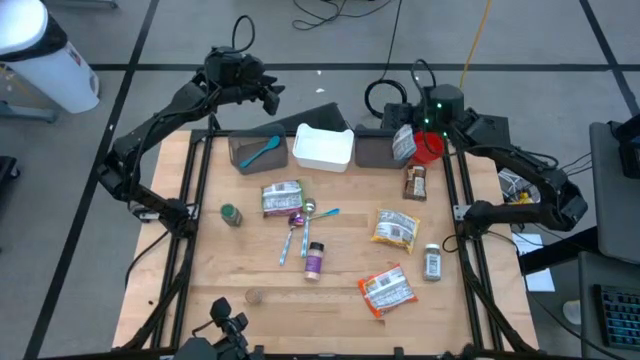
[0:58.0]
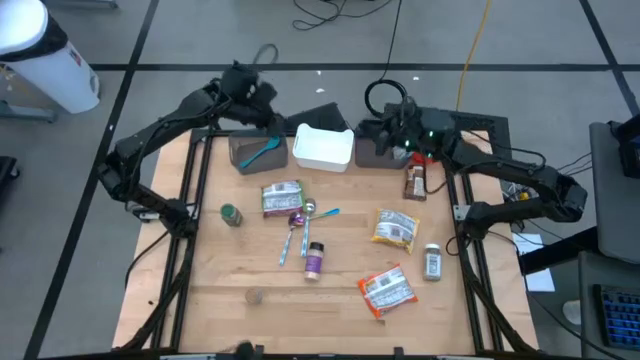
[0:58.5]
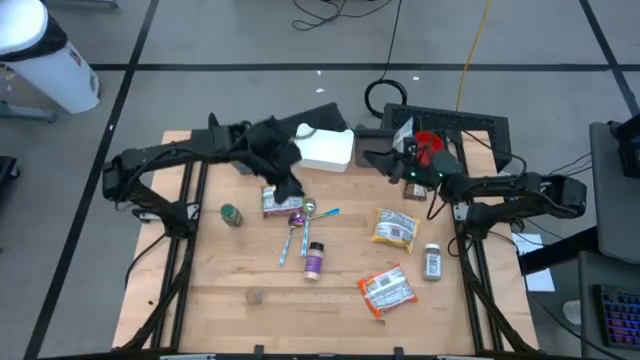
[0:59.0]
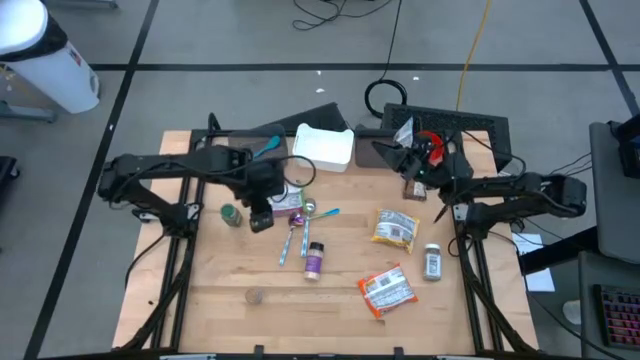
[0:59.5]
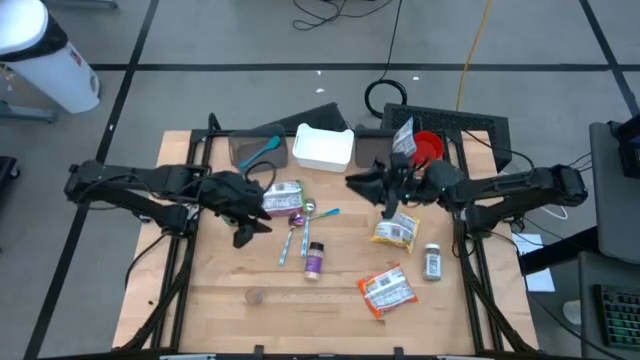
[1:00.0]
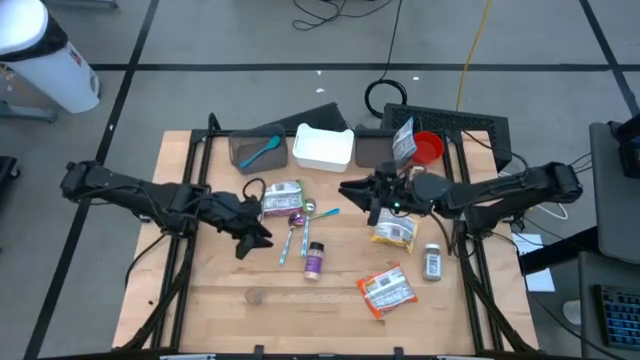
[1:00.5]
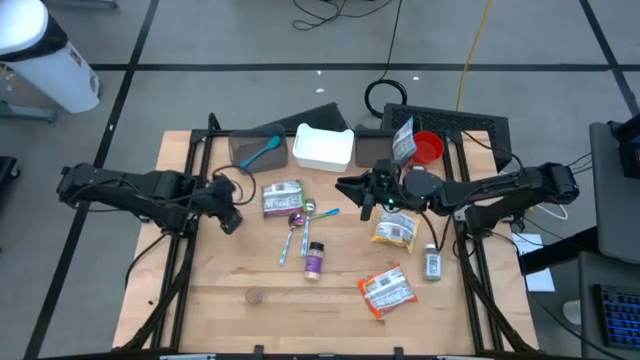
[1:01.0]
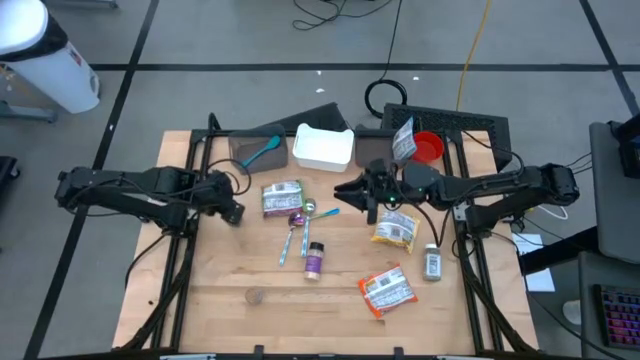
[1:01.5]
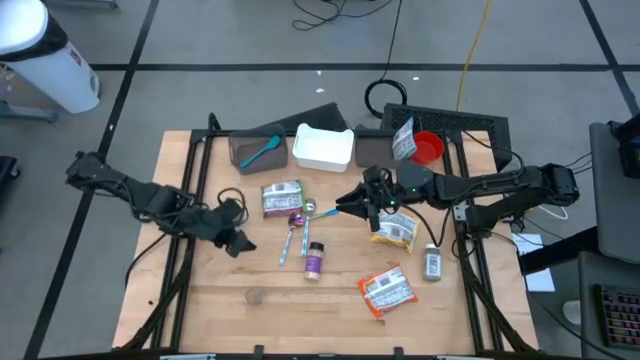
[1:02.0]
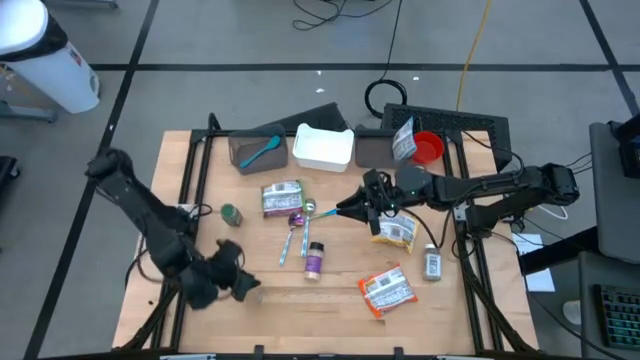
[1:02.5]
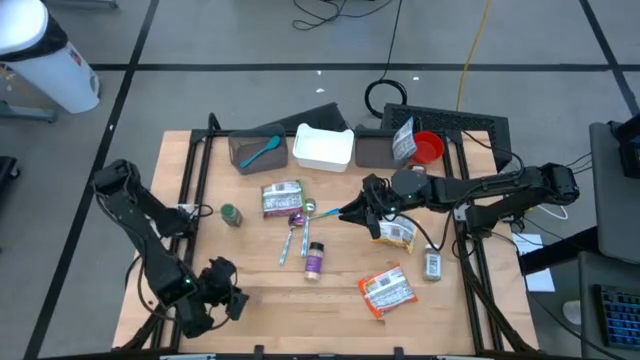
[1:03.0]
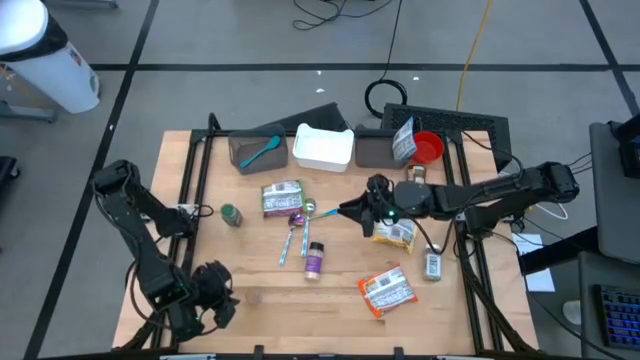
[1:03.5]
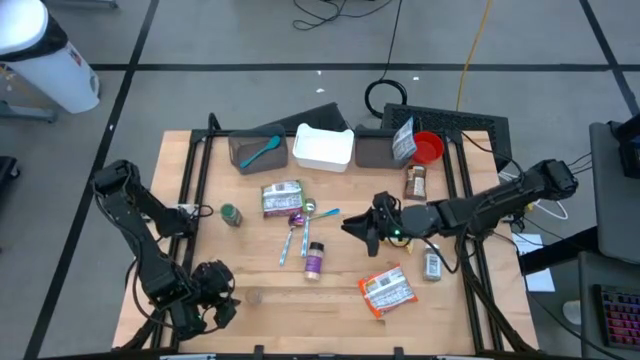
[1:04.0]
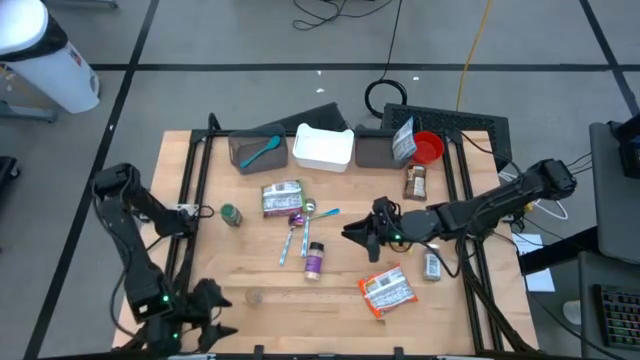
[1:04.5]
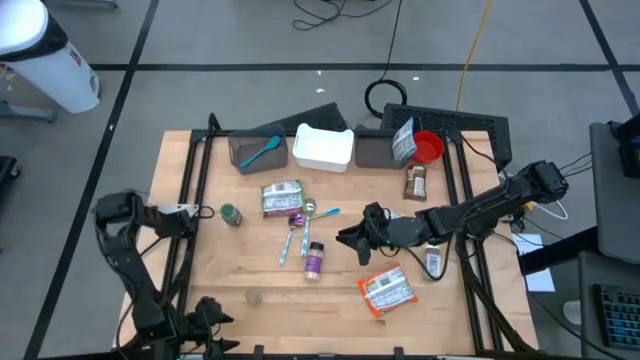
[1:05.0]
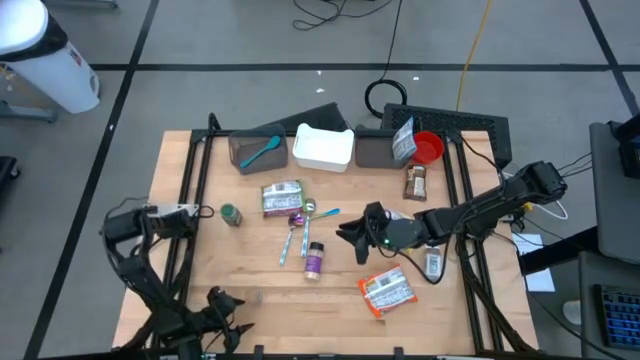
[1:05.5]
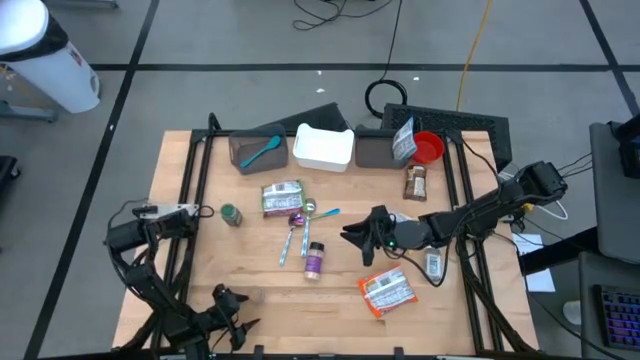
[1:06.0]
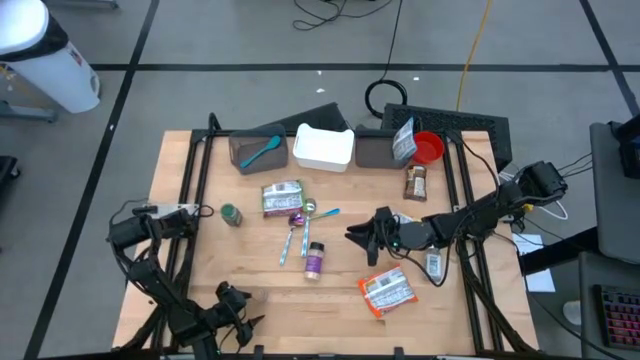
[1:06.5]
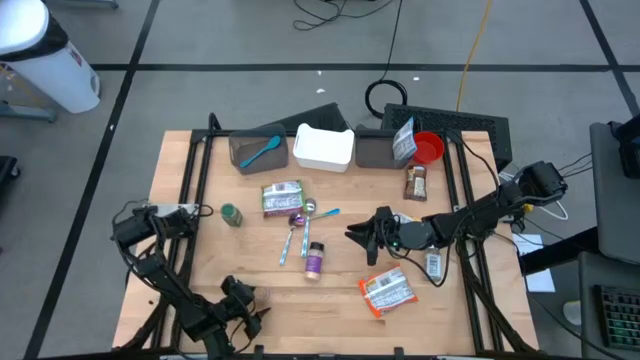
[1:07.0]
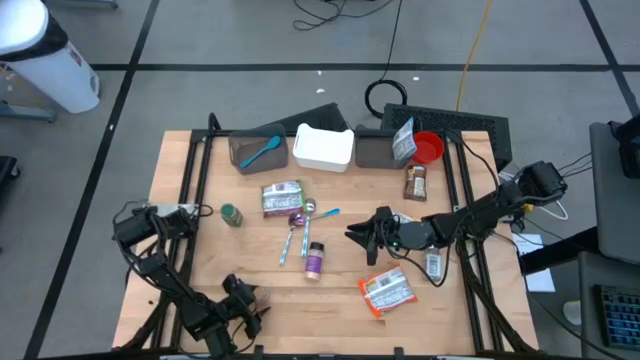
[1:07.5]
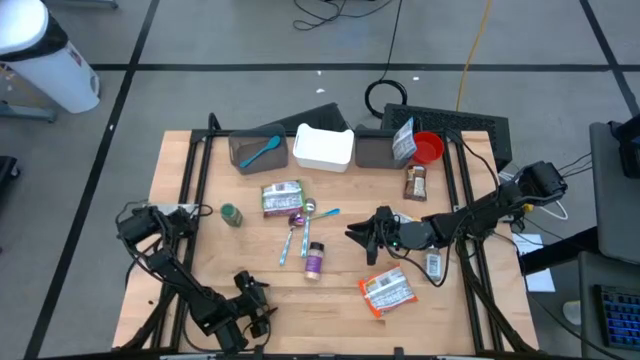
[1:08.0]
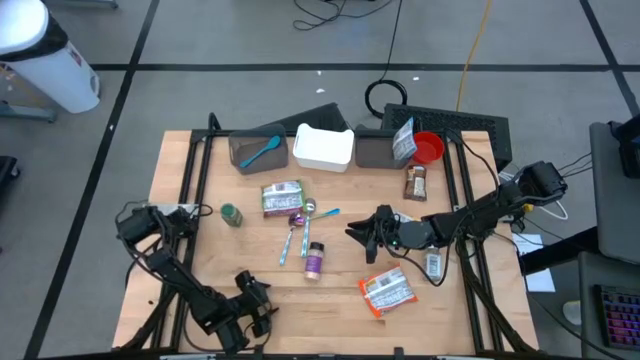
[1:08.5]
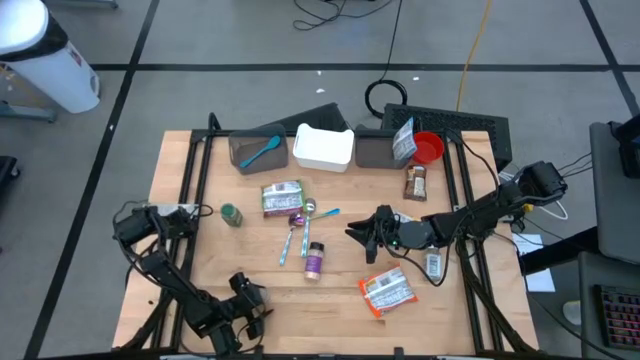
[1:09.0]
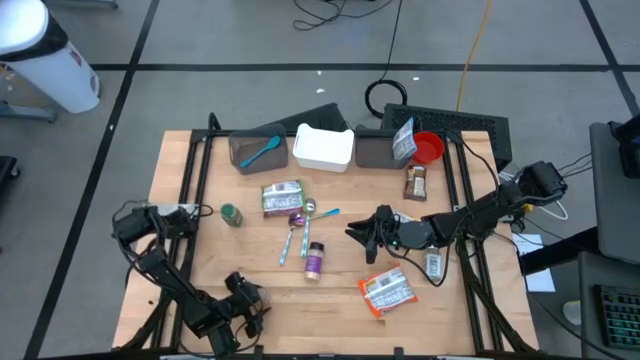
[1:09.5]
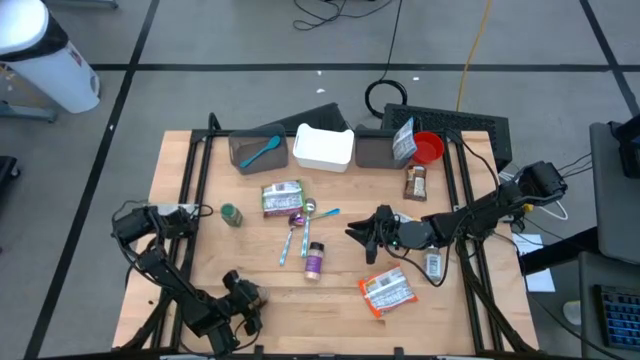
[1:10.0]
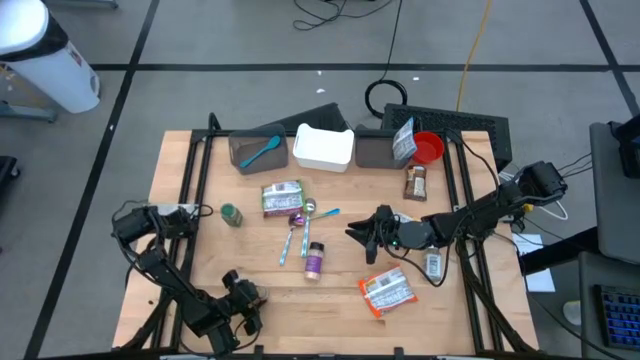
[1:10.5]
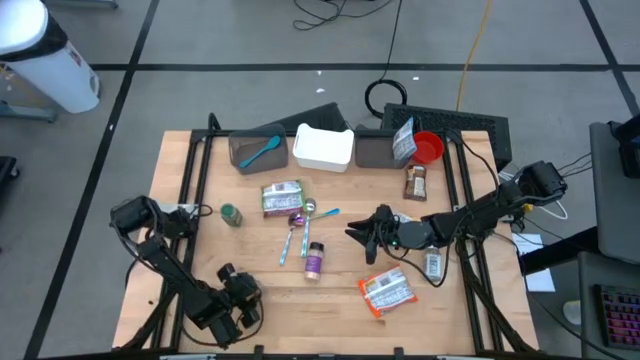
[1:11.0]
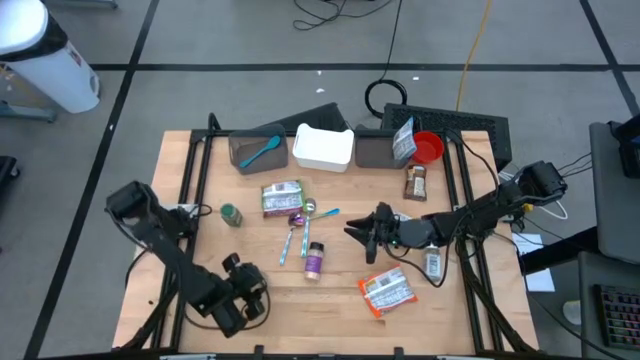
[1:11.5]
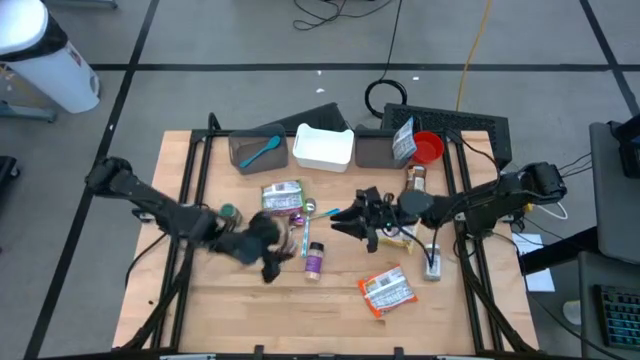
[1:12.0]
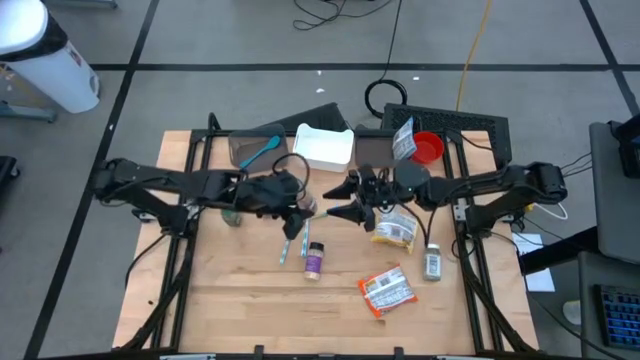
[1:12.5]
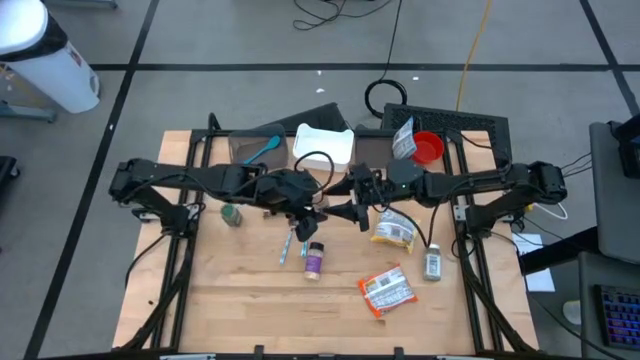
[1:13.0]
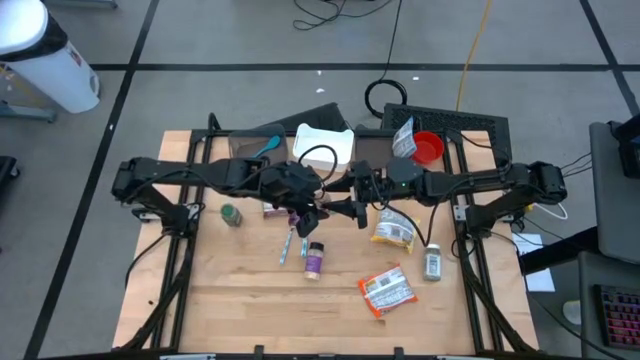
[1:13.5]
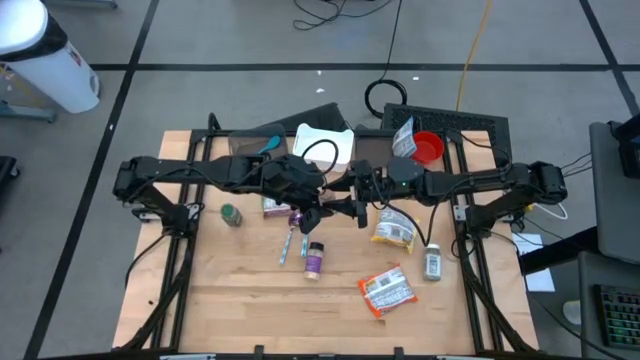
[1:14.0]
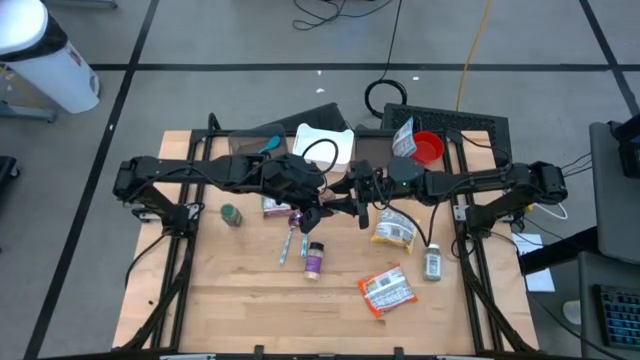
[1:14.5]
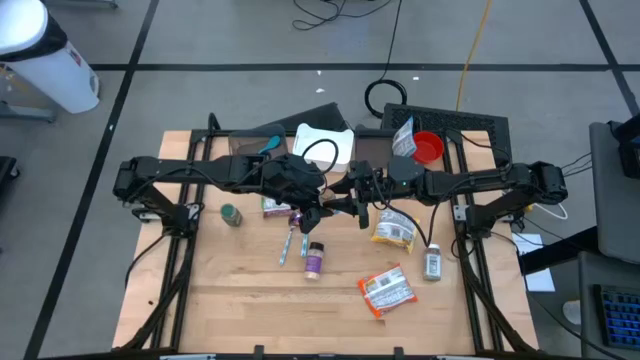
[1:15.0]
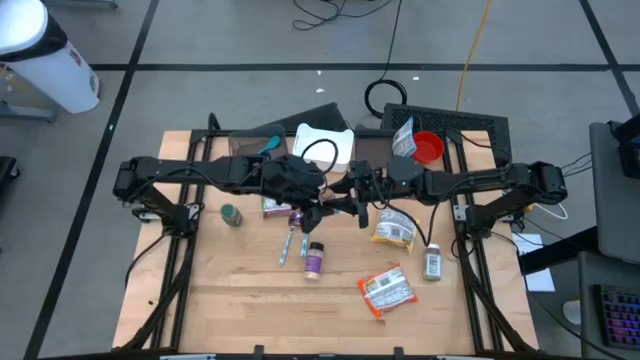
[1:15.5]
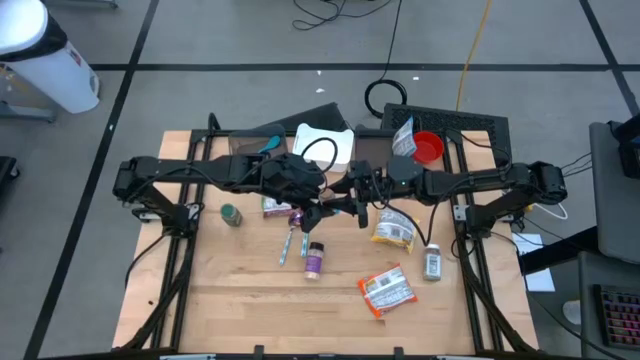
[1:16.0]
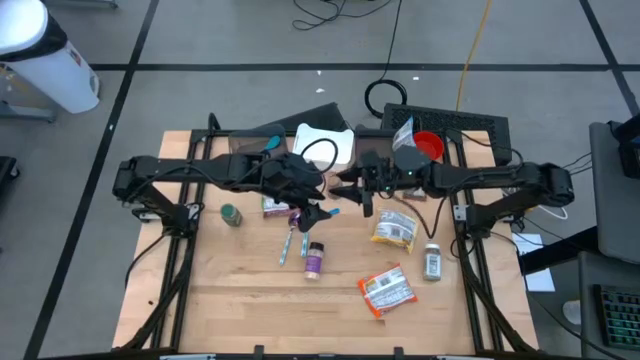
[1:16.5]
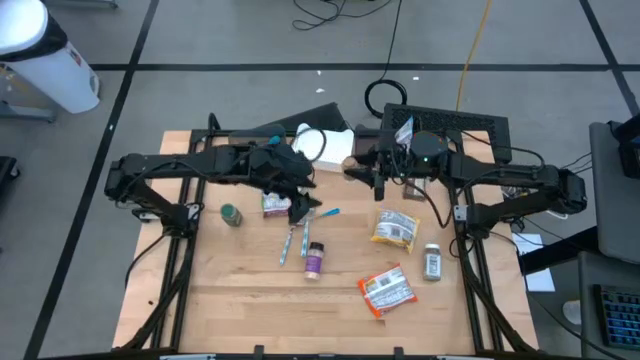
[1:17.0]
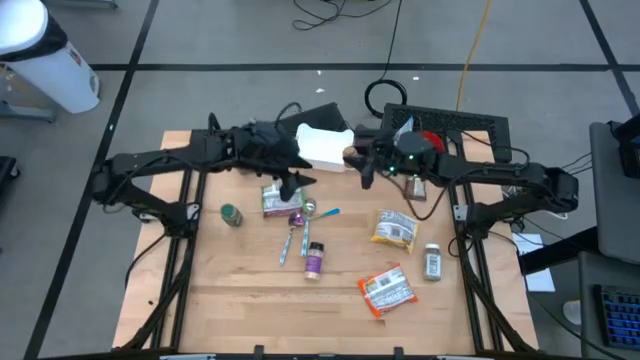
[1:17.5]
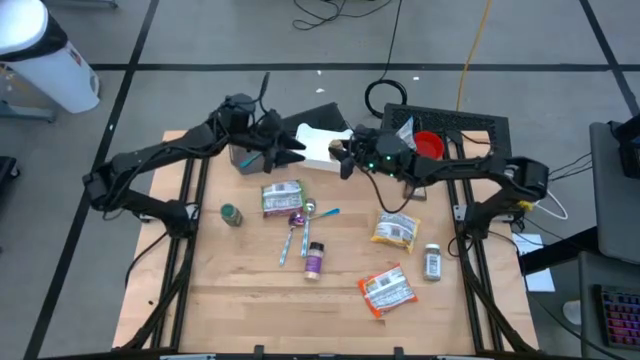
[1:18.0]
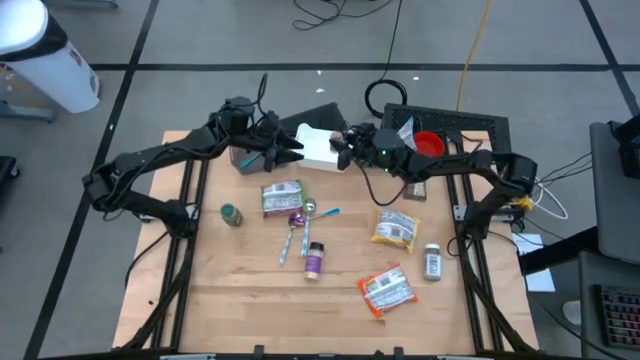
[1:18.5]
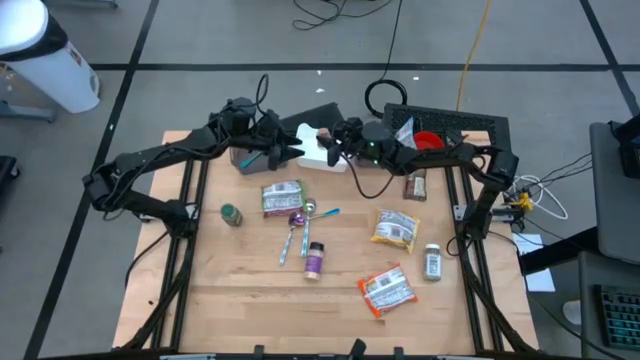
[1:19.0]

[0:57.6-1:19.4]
Task: Pick & Place Food Item
Put the brown seasoning bottle into the white bin
